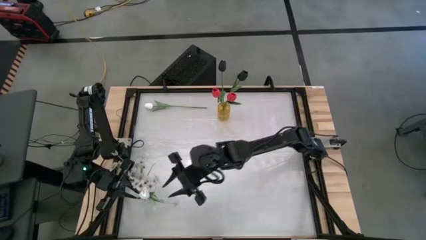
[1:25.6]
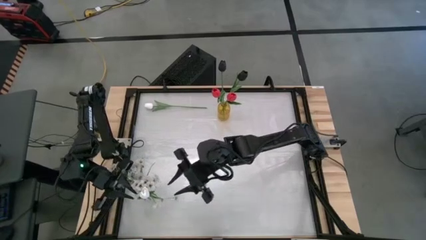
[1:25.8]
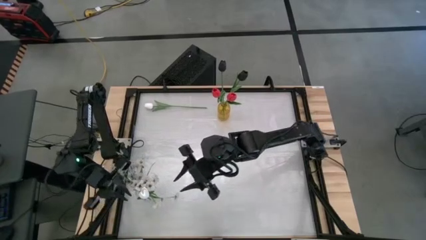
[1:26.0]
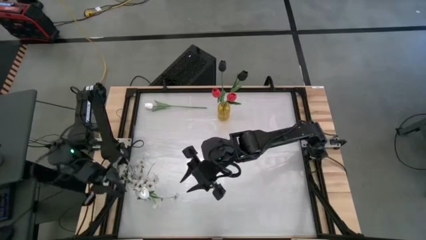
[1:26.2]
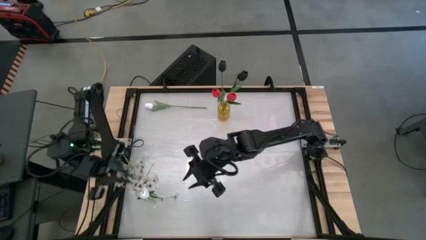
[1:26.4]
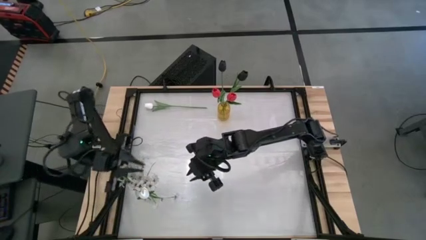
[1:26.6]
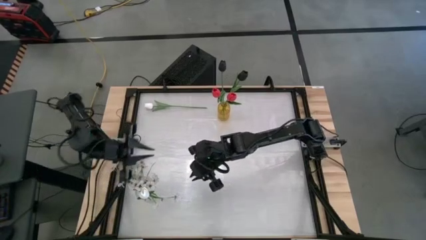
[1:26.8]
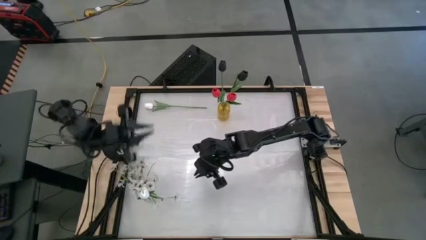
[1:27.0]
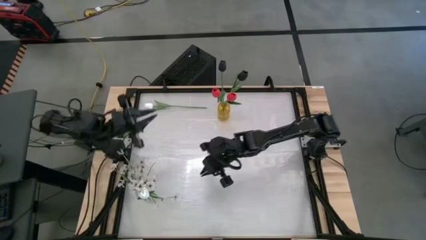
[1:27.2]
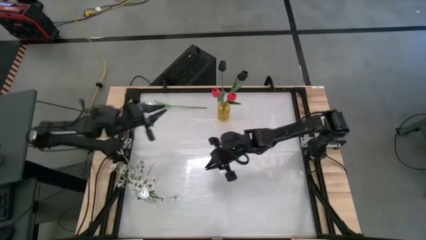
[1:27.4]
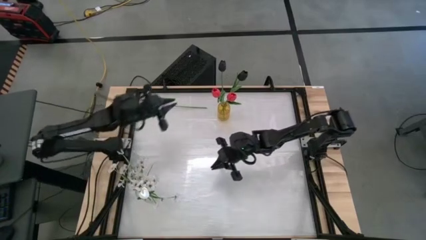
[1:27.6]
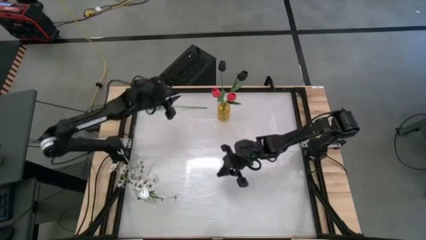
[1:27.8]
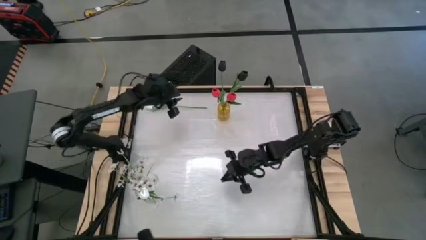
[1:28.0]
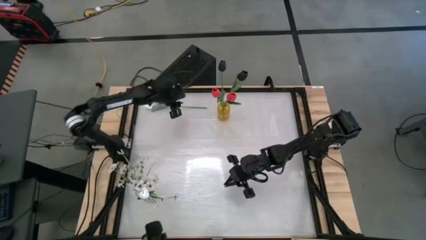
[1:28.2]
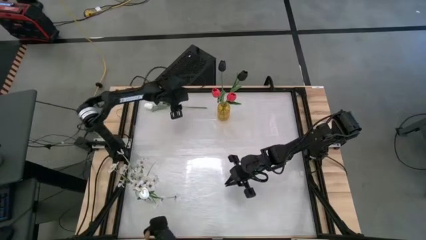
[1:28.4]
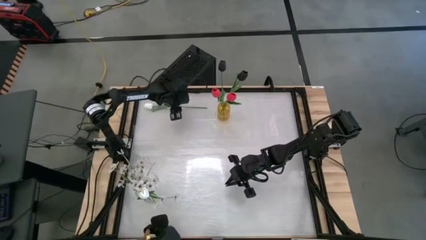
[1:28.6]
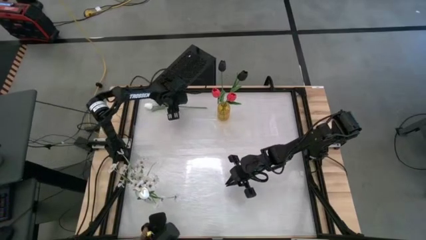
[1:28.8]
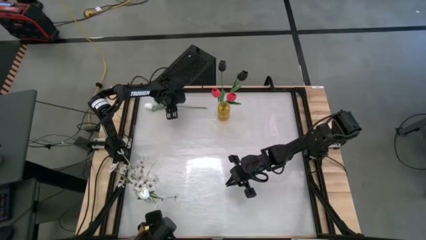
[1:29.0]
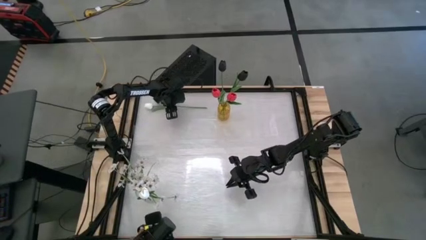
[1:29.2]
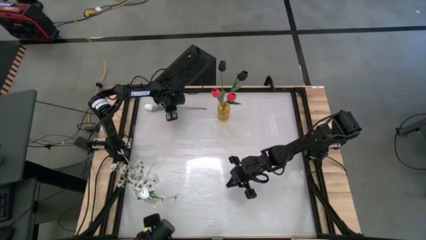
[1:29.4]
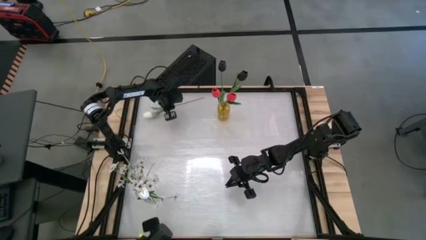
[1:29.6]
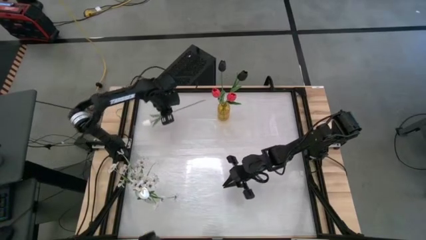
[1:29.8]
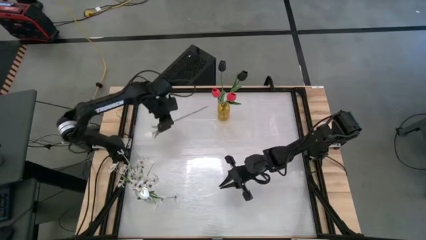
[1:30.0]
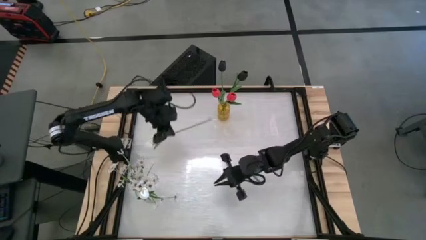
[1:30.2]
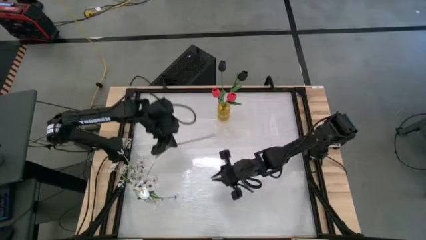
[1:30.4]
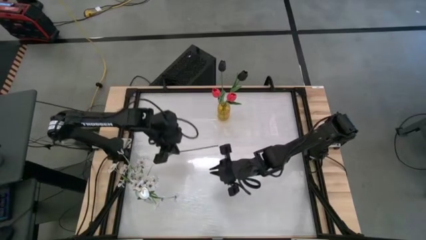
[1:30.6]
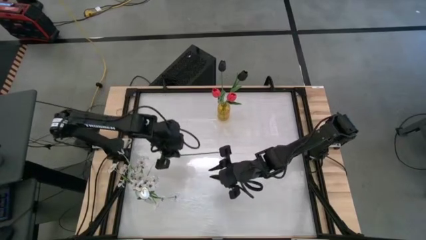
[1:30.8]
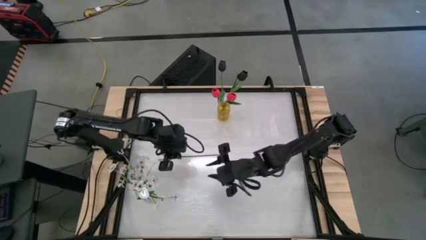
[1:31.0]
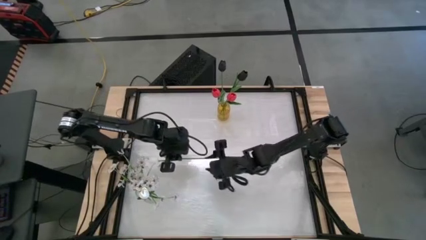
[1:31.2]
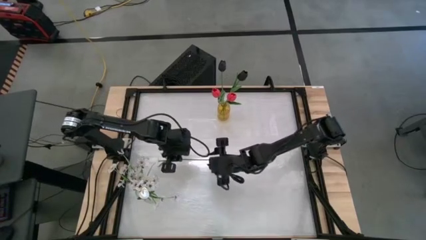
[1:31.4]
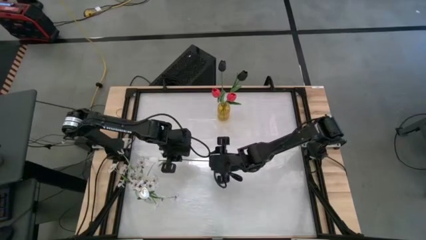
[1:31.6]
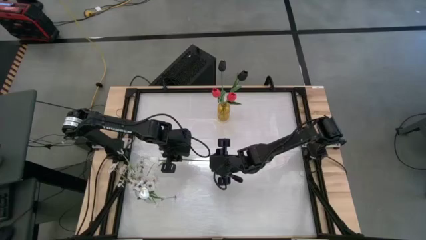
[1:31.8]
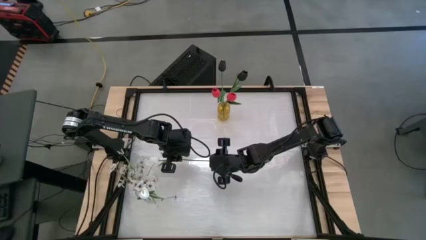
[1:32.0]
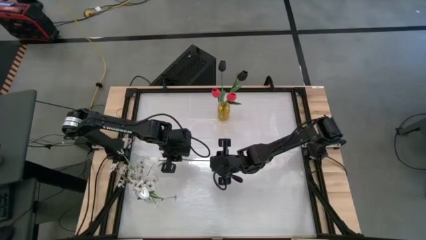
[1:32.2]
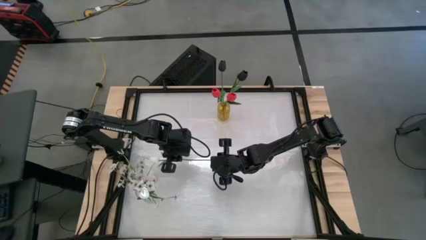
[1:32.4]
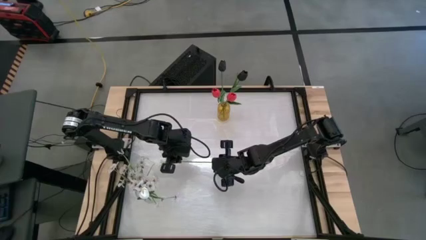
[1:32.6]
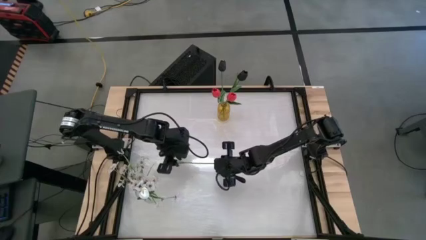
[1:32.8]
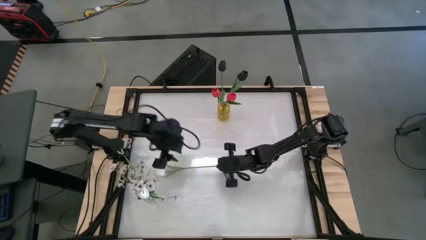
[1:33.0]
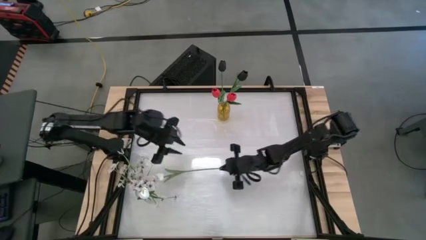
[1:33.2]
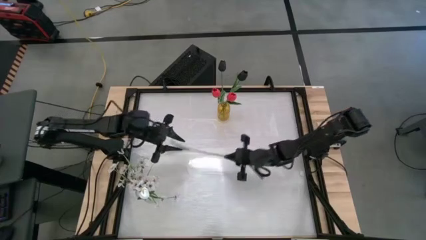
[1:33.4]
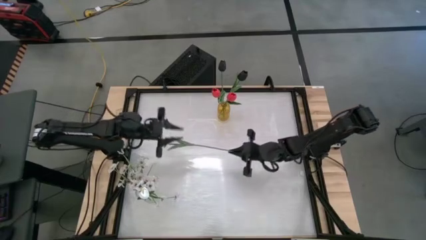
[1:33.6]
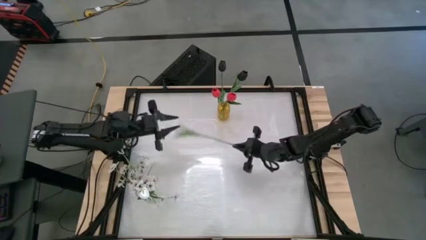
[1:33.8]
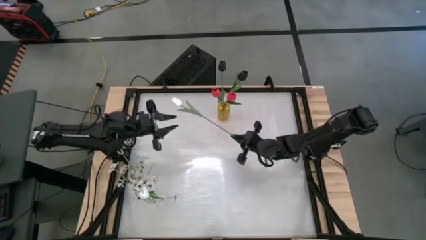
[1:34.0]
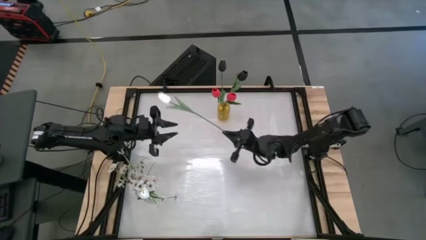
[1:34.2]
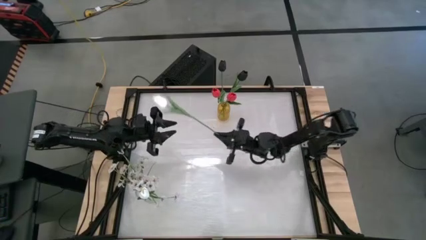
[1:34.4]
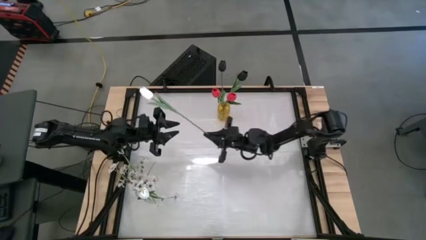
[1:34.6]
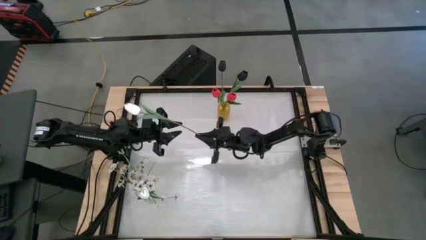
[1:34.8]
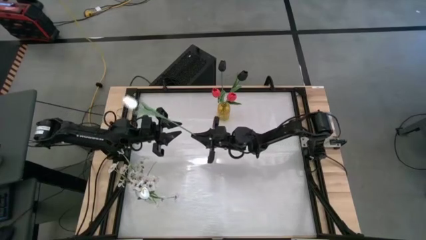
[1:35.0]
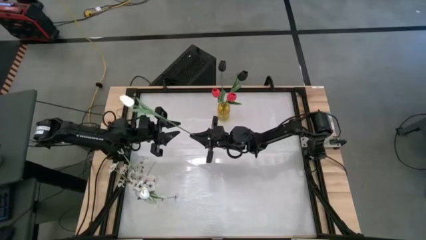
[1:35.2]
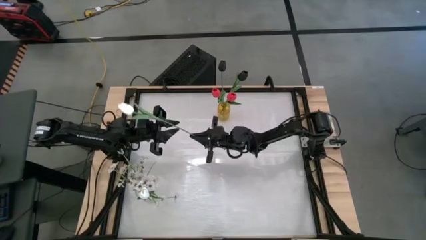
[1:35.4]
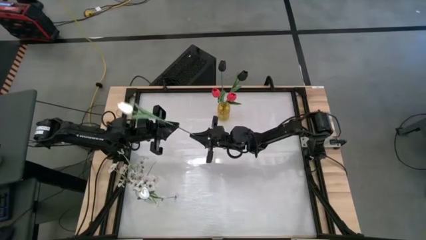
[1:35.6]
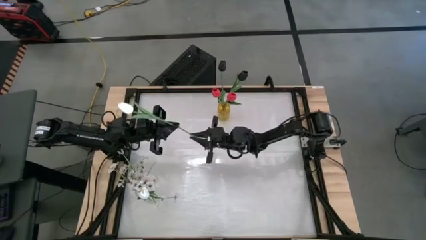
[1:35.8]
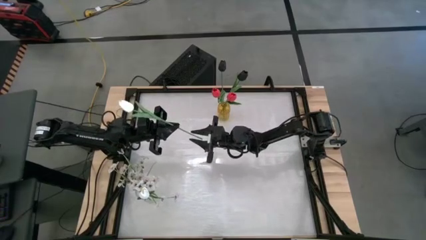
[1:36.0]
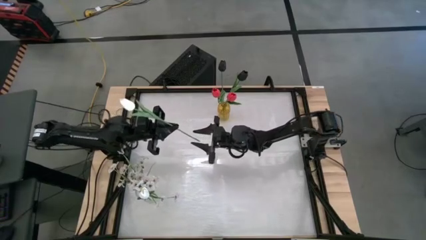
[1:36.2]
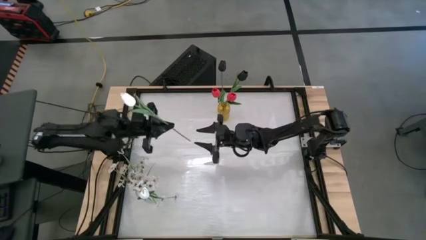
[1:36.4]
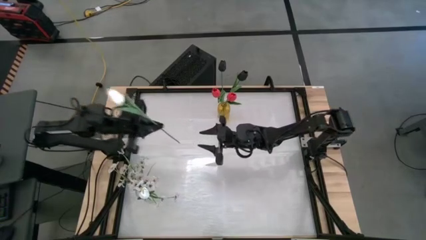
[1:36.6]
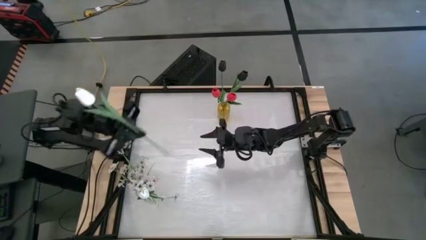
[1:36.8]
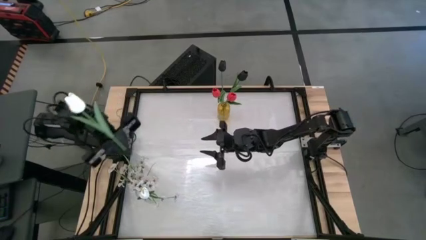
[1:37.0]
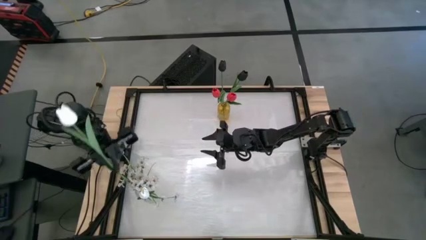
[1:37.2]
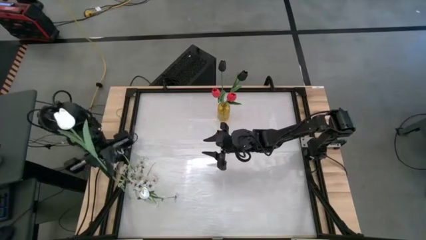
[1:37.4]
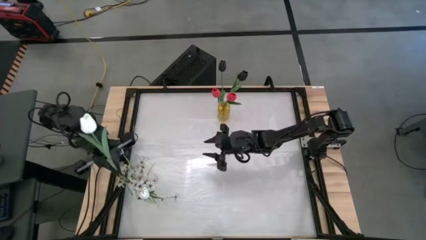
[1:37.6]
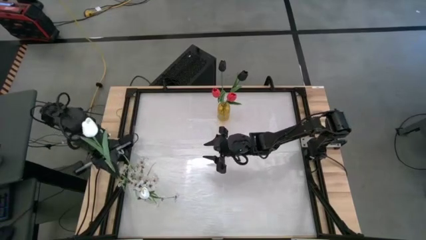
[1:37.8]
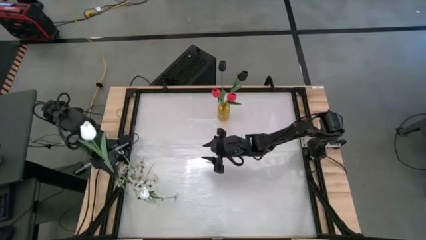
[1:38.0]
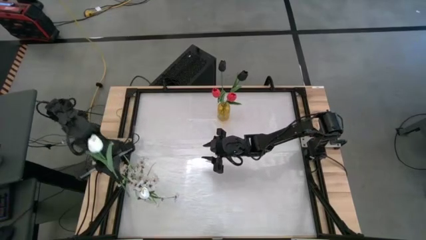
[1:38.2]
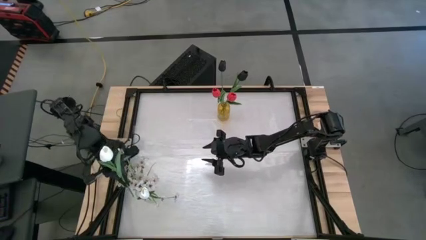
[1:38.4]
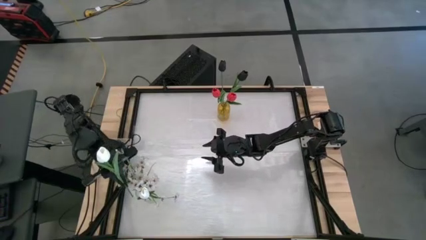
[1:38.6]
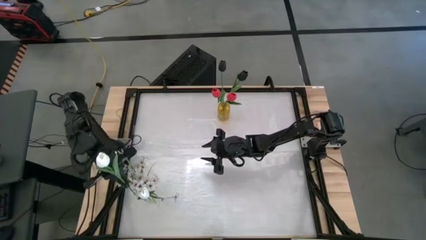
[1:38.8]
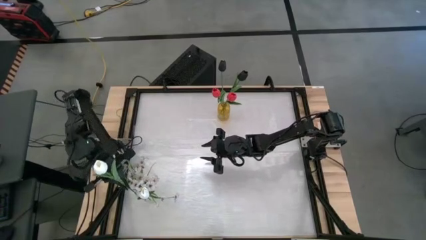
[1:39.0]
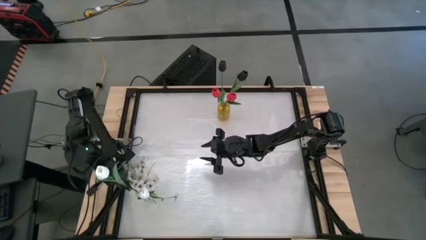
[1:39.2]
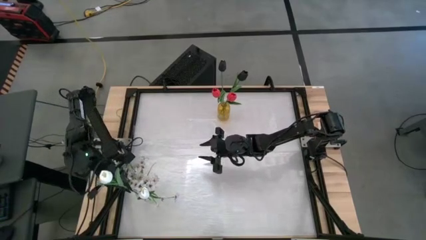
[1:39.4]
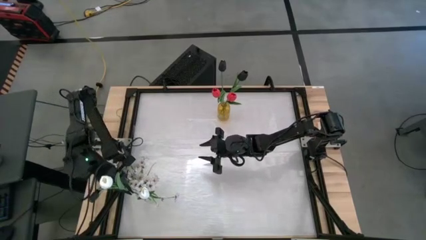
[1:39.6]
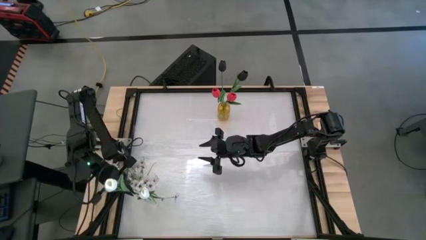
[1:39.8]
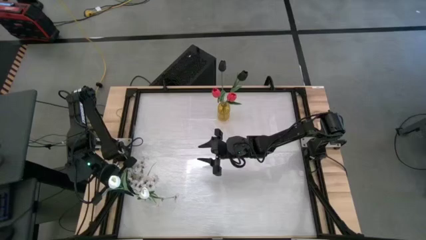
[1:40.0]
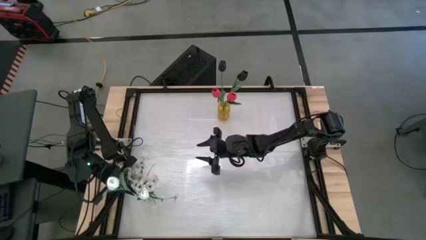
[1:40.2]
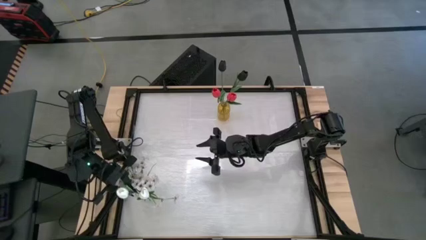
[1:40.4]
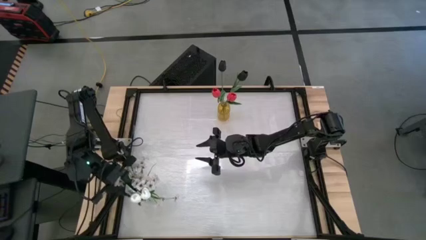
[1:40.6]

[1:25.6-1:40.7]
Task: Sort flowers into vase by color
Put the white tulip into the transparent vase
